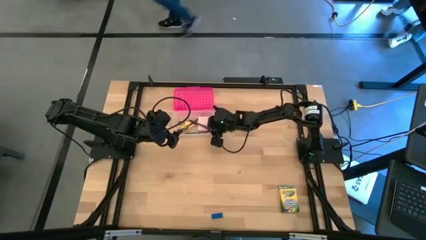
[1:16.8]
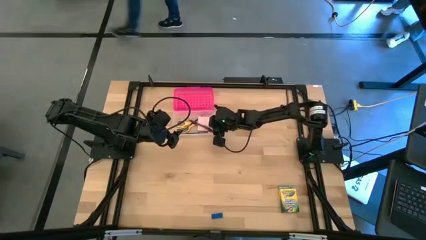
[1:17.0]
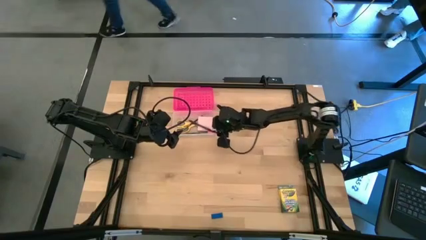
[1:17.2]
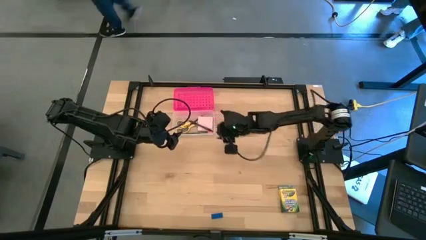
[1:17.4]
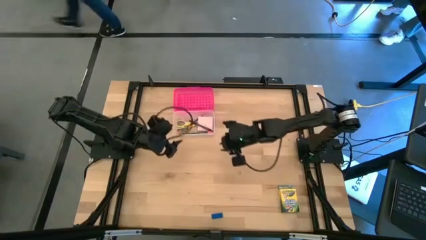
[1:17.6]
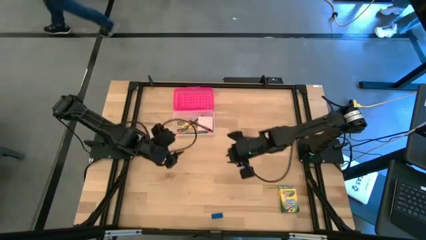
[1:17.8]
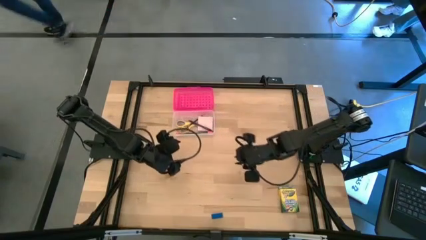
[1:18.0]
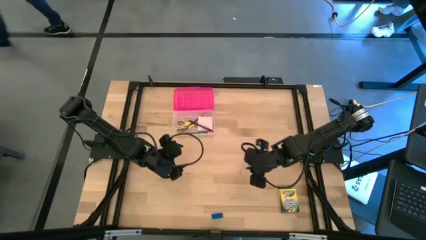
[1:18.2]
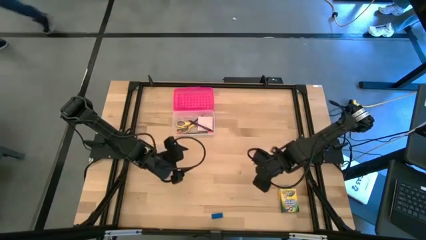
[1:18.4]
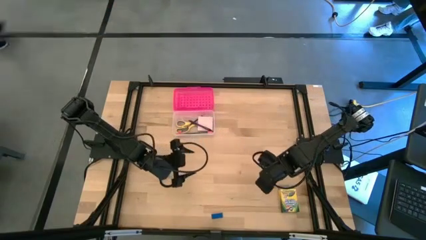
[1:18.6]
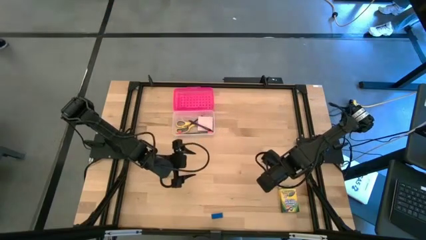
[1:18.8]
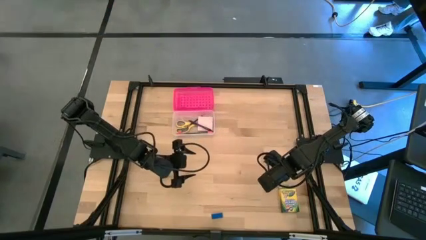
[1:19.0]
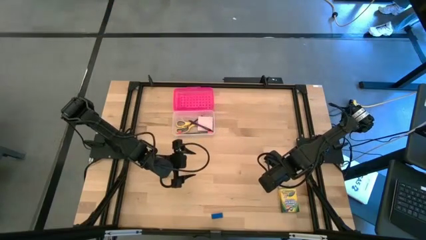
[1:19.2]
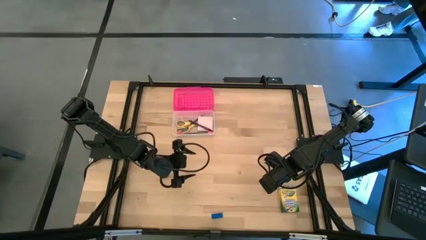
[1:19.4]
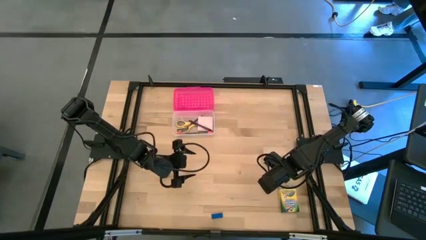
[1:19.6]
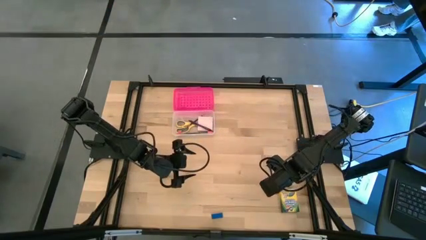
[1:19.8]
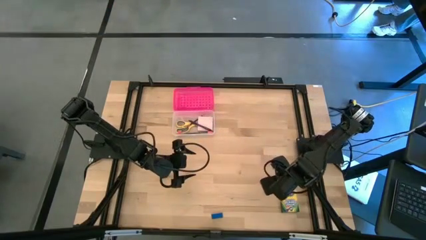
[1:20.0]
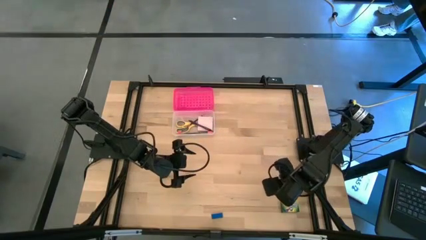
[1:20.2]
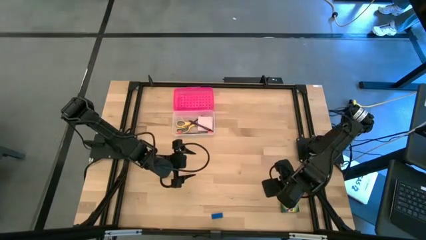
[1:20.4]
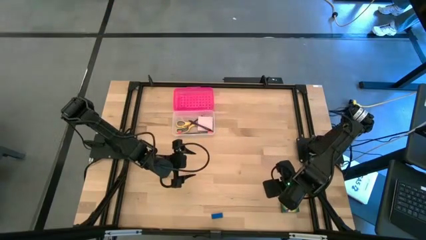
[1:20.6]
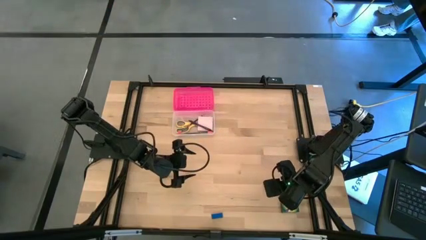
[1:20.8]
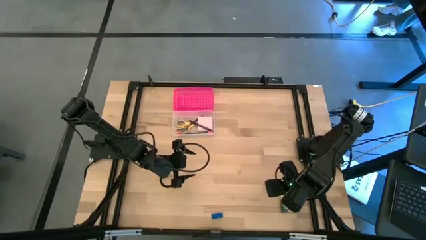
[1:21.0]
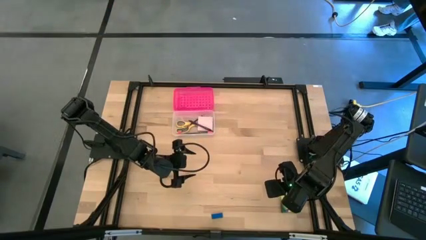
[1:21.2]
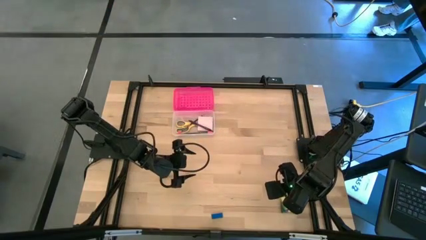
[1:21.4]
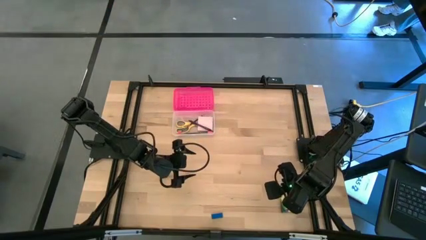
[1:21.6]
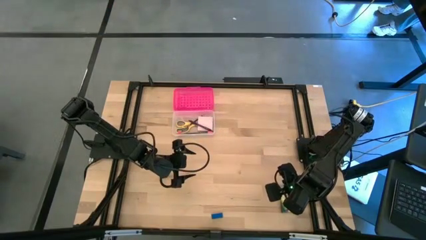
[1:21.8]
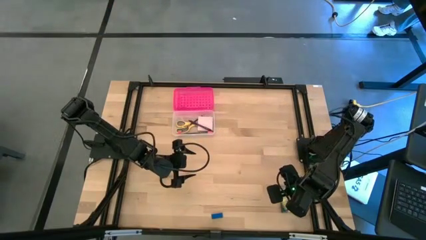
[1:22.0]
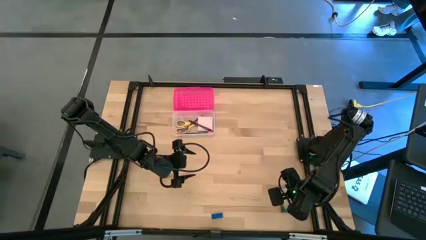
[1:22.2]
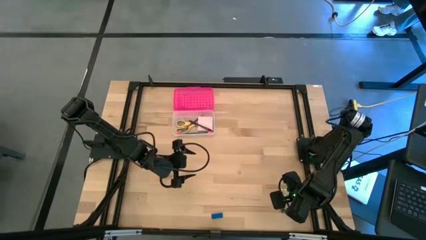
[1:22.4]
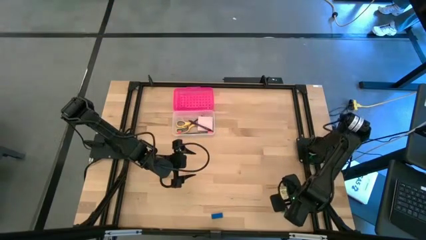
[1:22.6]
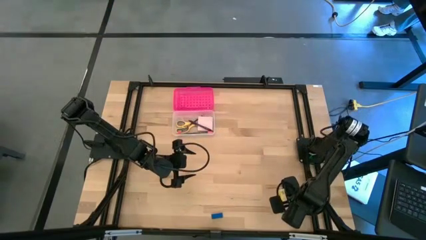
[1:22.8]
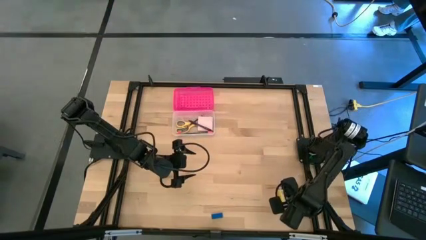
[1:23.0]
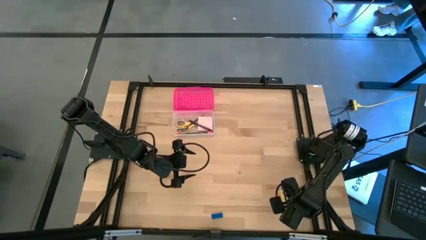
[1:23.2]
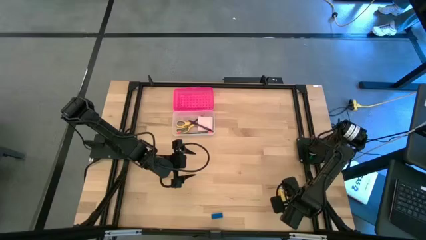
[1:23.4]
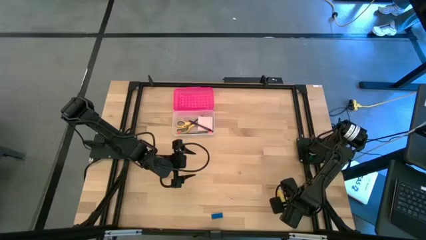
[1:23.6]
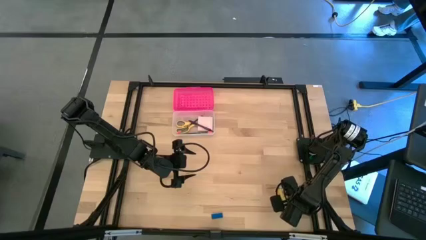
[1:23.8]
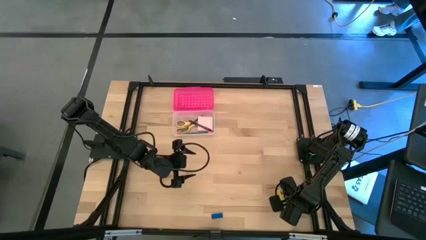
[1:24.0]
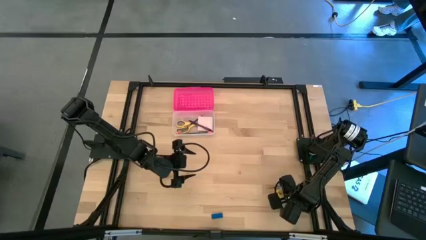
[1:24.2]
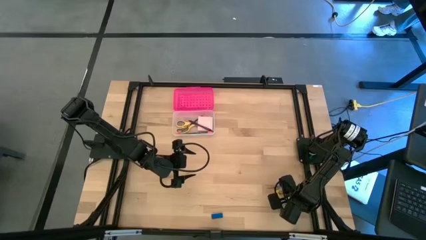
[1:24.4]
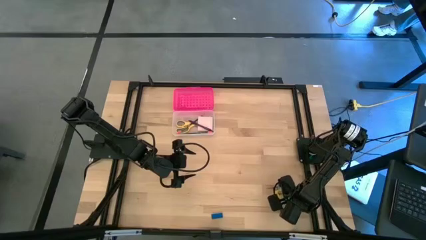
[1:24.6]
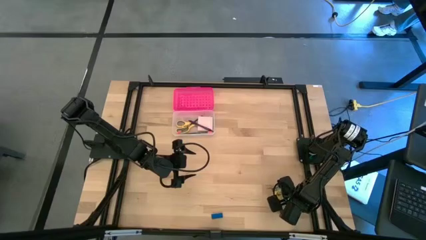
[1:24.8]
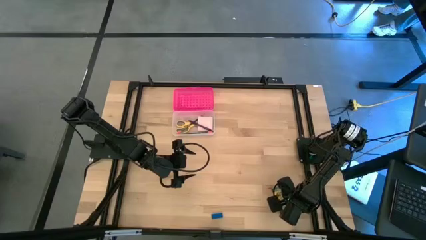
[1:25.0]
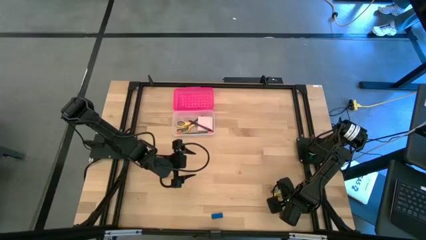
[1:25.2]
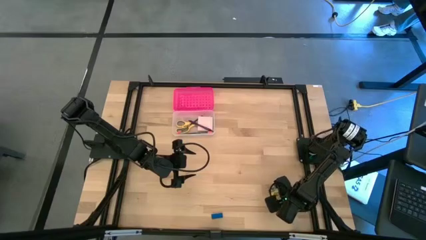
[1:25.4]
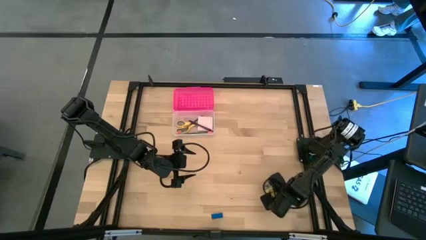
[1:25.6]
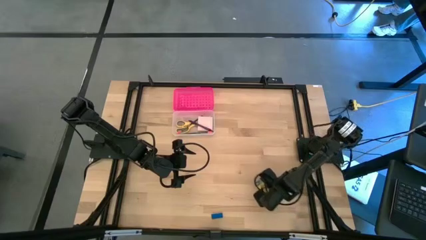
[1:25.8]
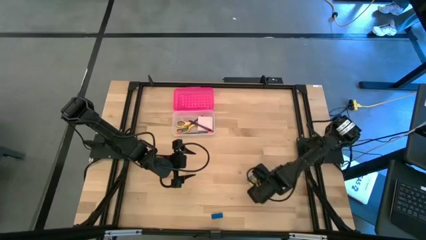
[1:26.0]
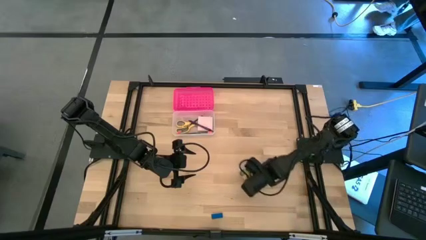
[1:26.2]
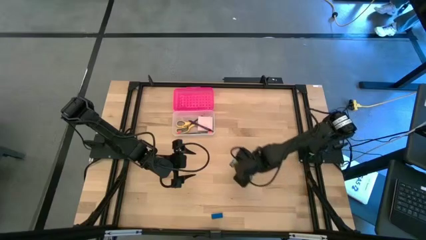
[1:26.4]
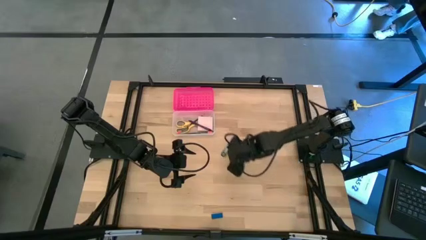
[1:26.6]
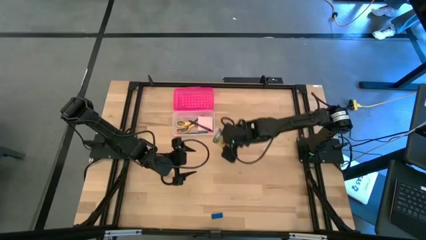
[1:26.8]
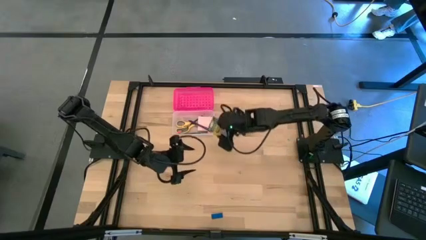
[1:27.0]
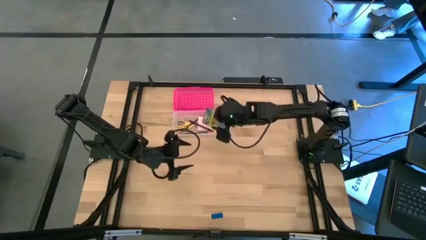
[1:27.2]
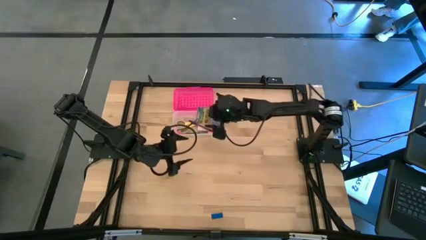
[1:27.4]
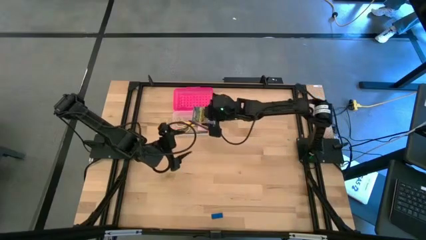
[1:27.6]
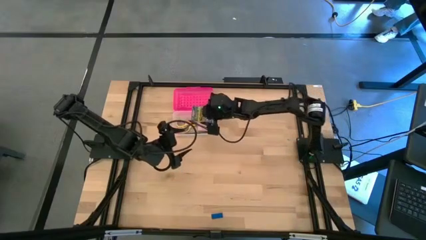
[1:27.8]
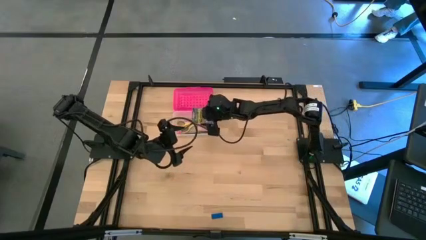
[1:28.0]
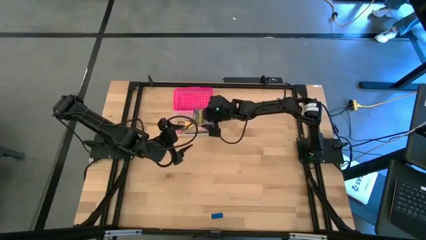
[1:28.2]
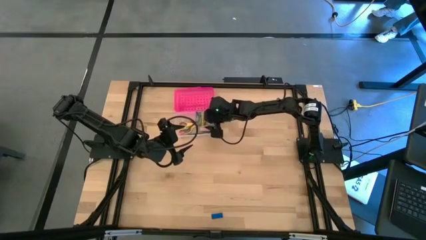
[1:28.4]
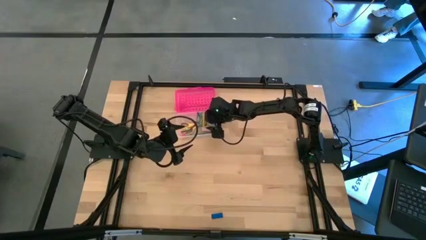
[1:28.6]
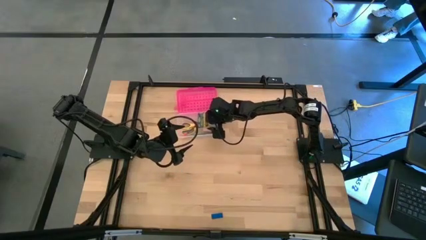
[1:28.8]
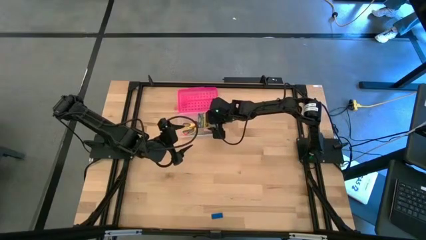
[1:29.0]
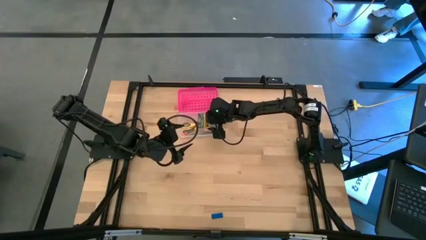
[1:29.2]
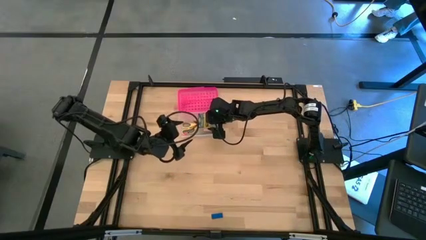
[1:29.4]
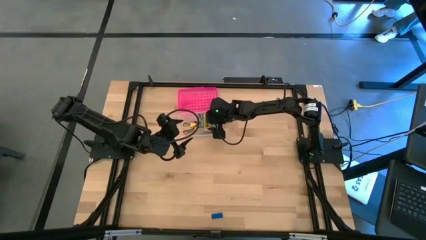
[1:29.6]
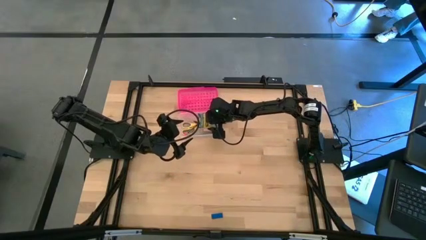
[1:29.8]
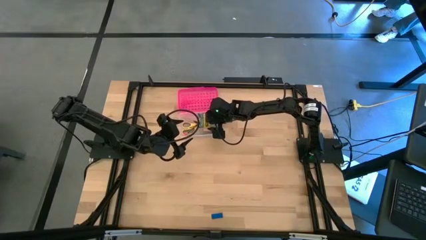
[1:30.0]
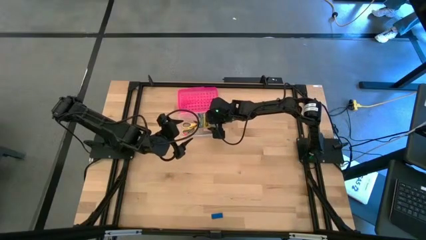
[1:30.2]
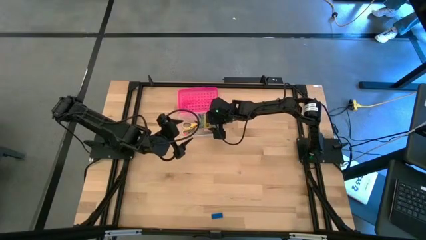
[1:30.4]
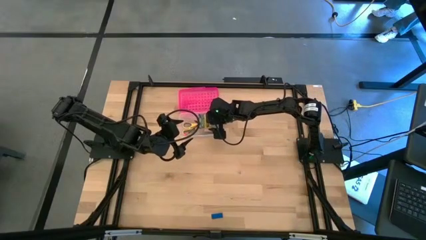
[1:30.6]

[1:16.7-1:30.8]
Task: Pack school essentials
Put the yellow crayon box into the pink supply box

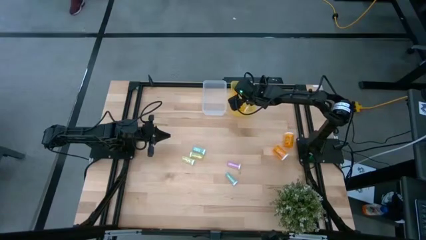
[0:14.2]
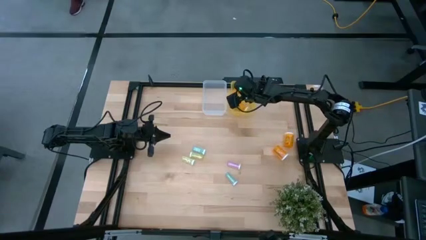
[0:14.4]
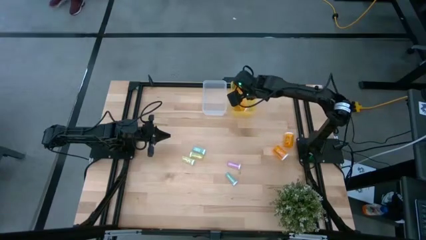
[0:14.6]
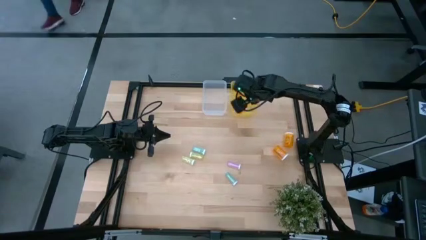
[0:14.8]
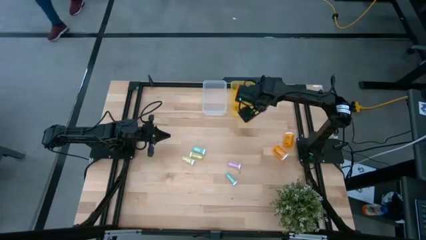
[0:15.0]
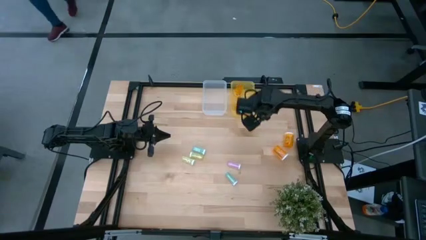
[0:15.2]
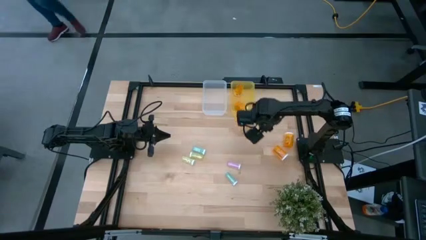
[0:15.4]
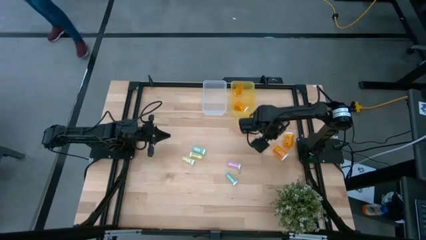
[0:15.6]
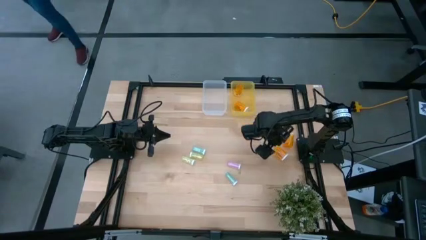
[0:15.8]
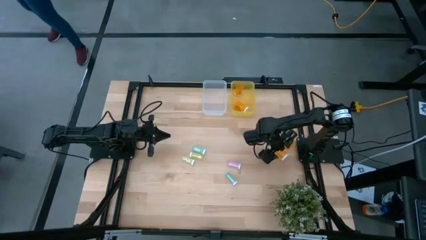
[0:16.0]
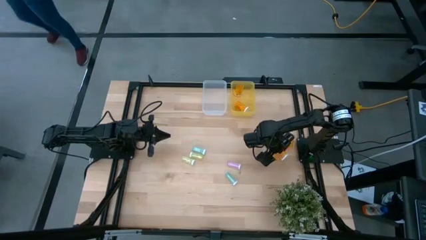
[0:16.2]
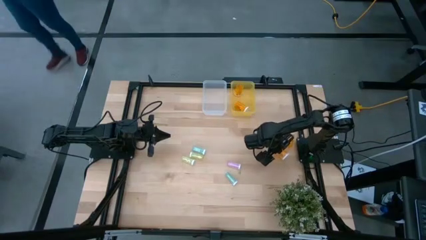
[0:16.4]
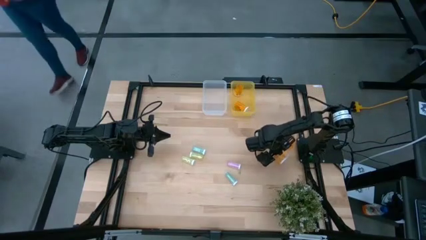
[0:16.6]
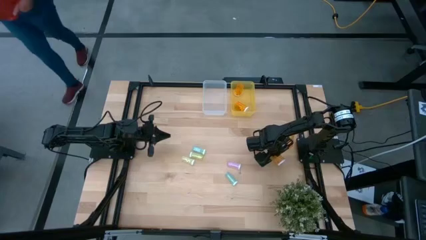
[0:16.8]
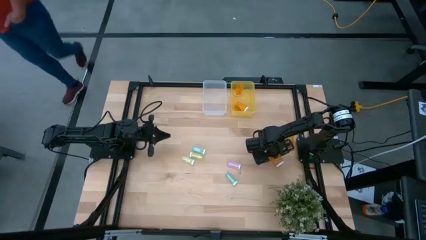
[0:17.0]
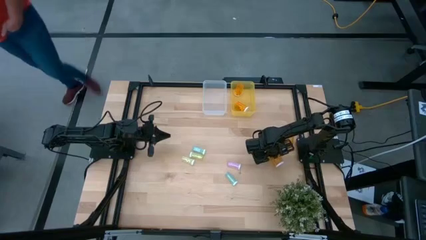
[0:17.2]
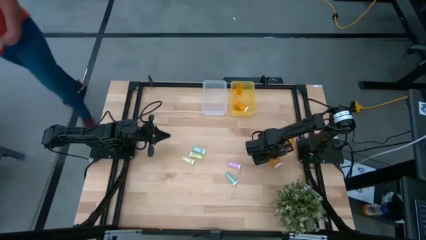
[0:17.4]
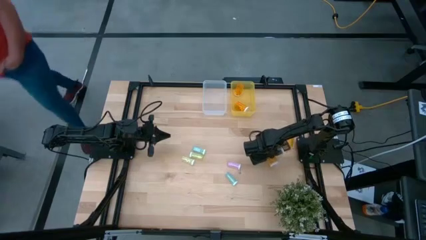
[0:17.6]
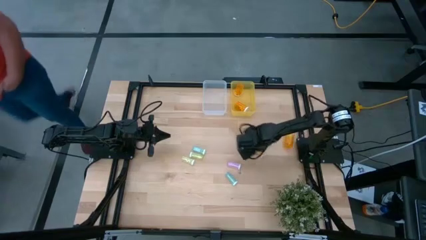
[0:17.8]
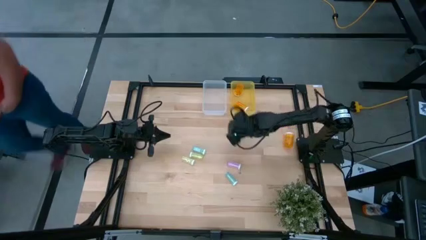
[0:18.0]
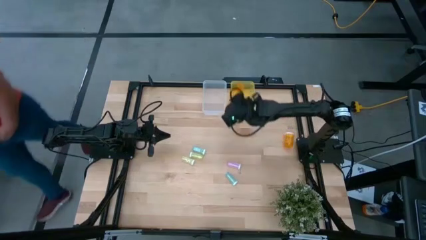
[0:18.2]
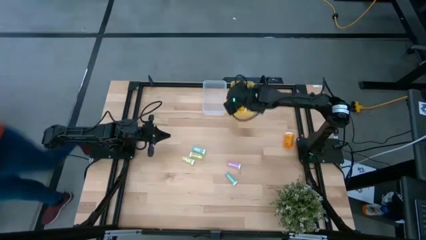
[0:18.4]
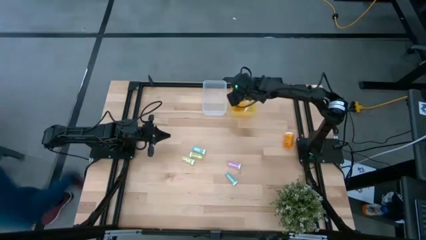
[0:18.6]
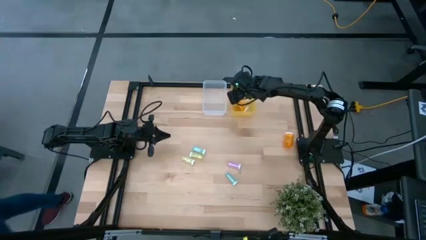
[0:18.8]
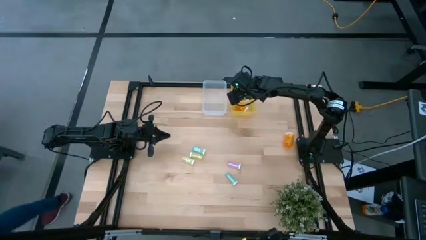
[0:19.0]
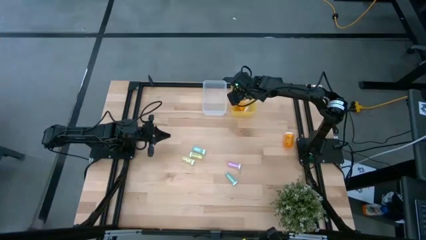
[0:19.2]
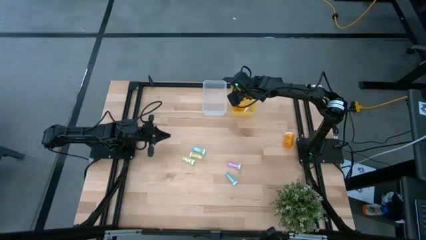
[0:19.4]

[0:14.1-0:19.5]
Task: Pick and place medicine bottles into bin by pill shape (circle, oval)
Put the large orange pill bottle into the yellow bin
